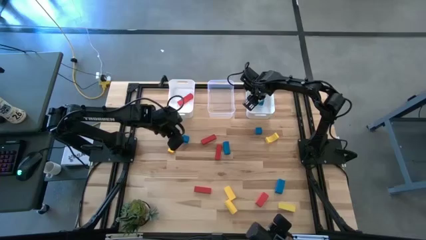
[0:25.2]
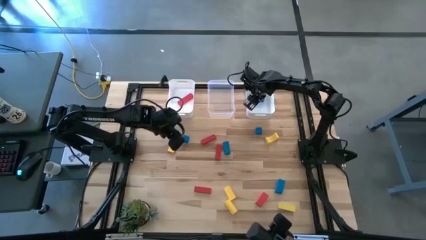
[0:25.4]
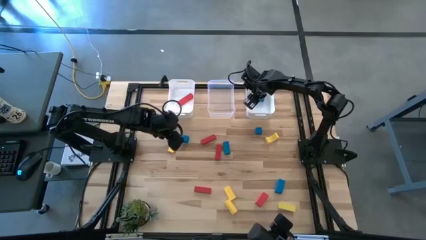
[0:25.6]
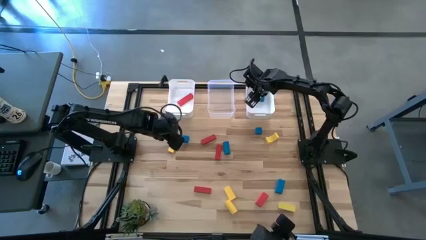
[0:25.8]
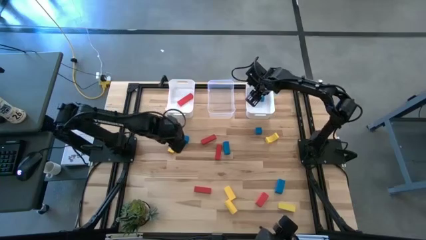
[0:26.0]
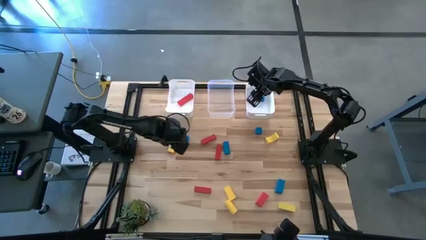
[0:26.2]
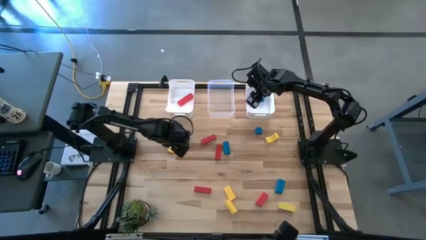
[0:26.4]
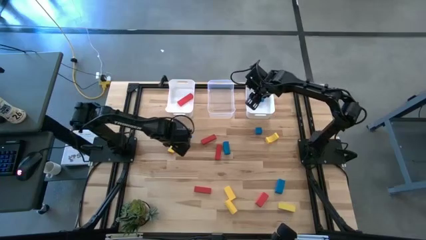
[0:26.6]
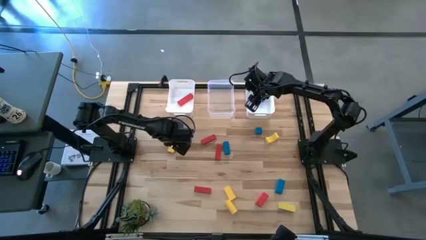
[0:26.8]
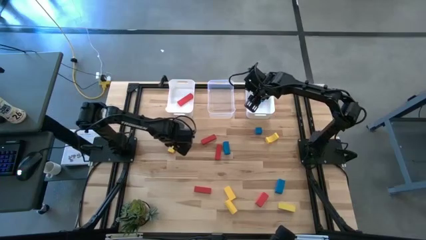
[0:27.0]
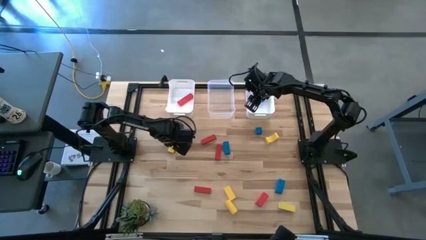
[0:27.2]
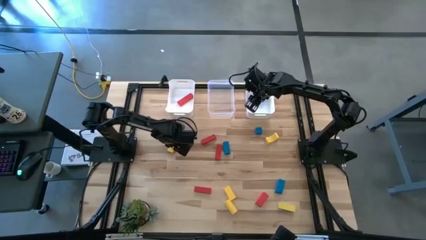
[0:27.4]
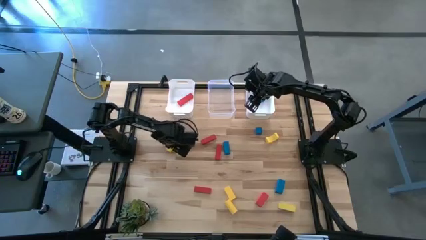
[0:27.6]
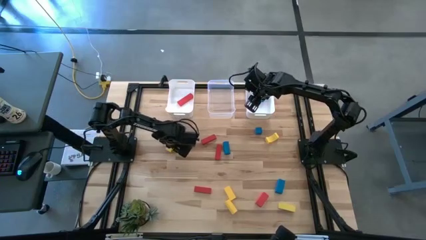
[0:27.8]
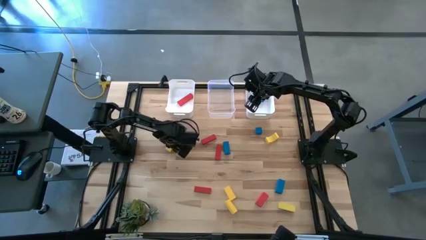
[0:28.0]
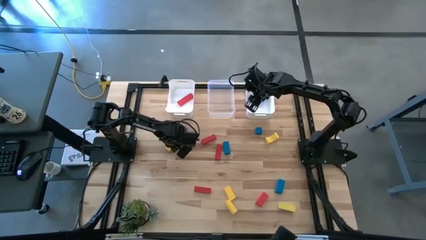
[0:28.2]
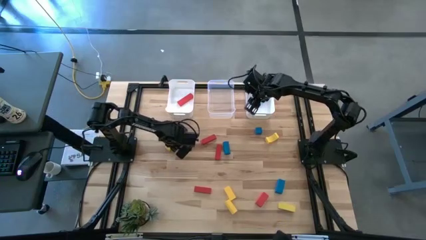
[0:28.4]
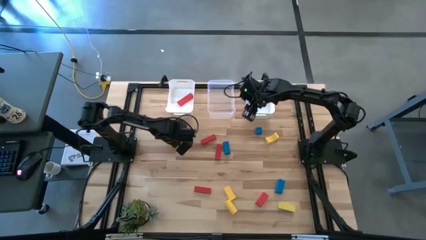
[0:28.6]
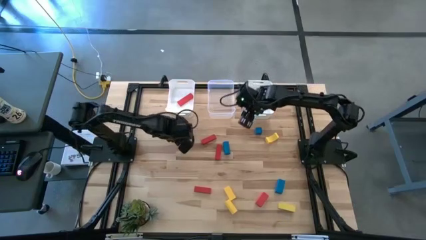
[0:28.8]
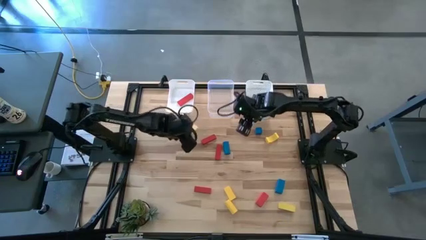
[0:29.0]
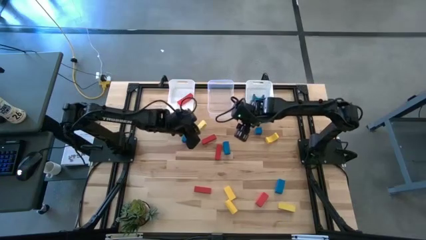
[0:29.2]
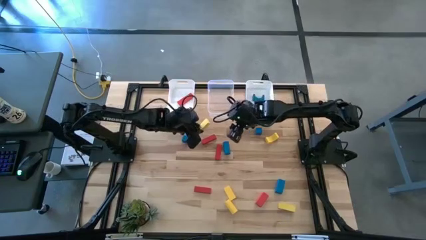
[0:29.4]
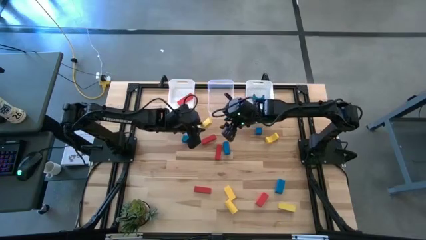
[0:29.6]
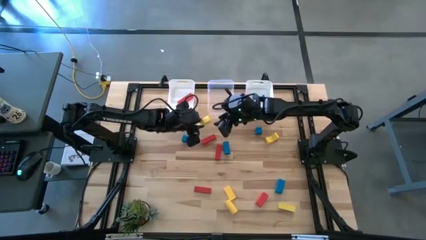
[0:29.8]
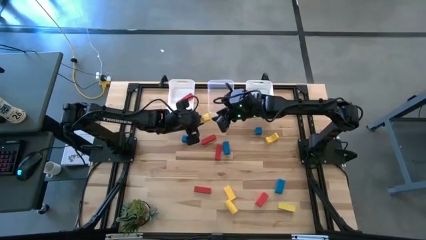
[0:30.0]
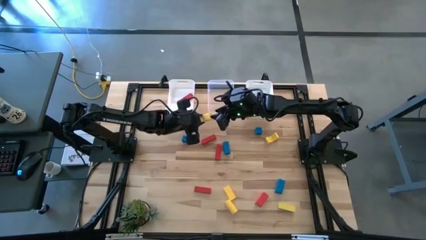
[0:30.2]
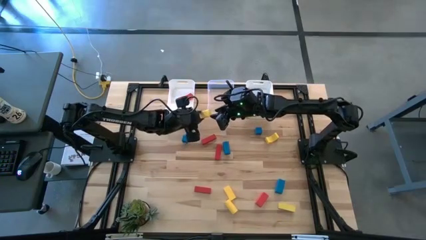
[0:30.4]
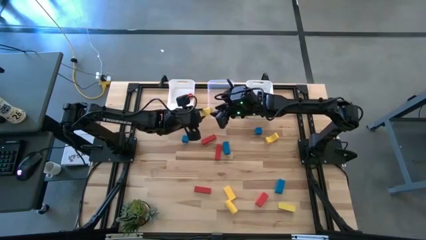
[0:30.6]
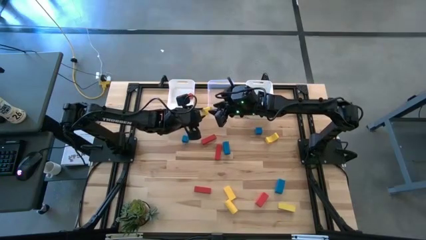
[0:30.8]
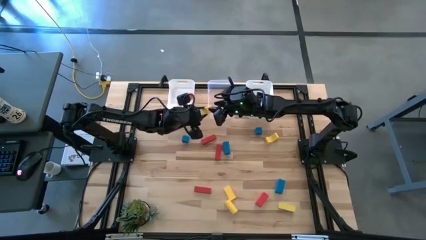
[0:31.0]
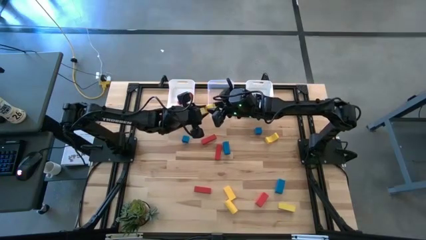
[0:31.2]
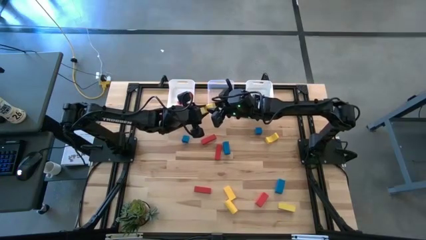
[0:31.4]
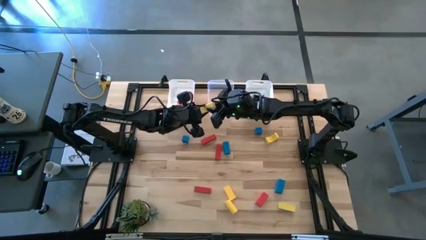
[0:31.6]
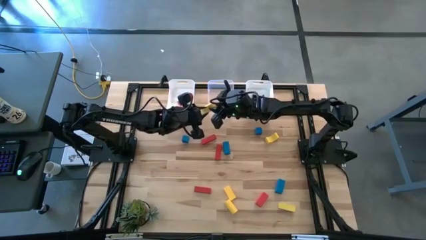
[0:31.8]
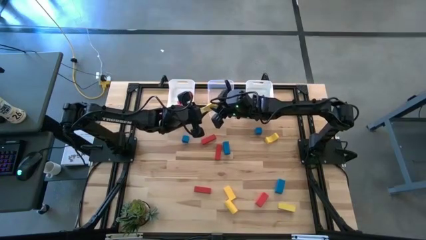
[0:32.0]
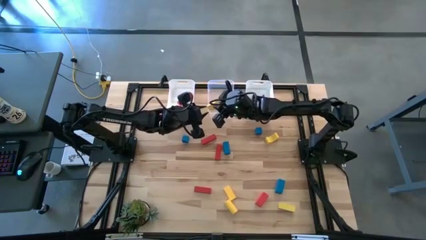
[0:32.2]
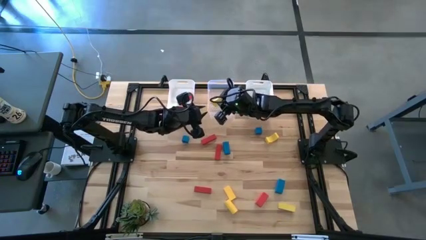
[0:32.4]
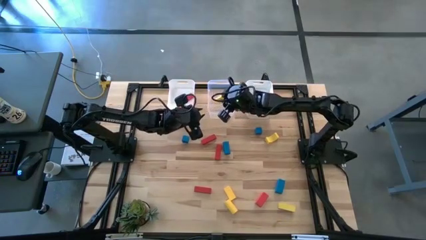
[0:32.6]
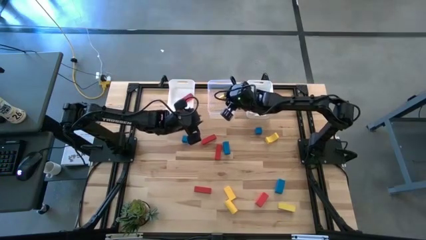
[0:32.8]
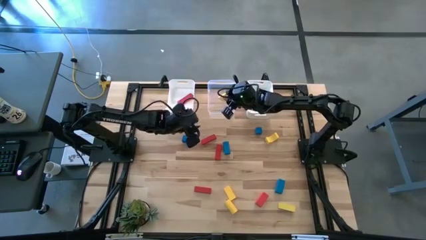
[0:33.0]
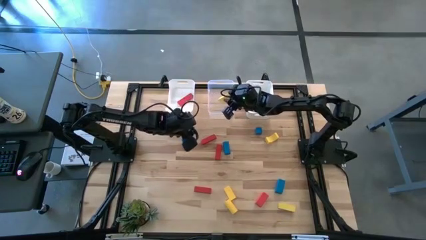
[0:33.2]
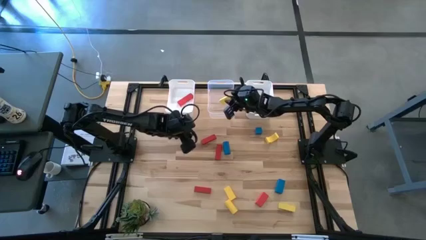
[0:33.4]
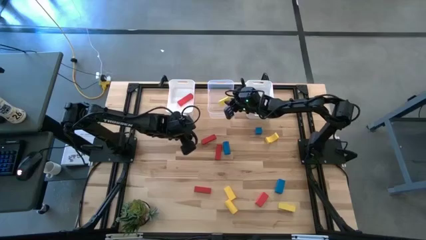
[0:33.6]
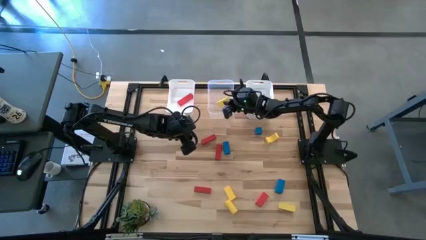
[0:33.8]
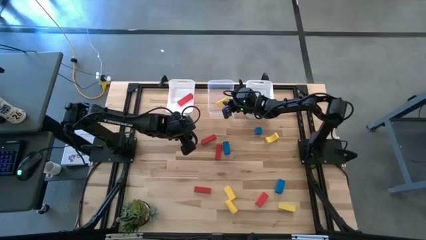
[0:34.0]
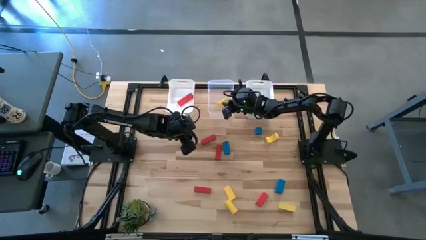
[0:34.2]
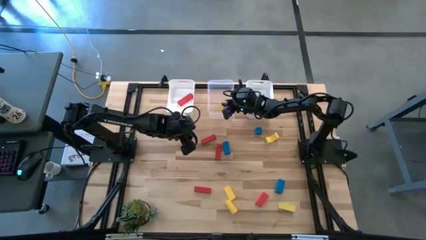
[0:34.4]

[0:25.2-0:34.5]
Task: Sort & place blocks by color
Put the yellow block into the transparent bin

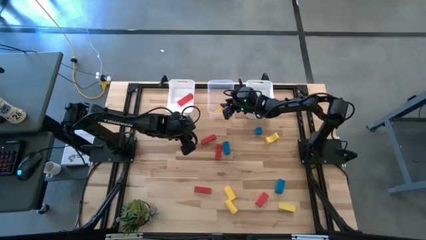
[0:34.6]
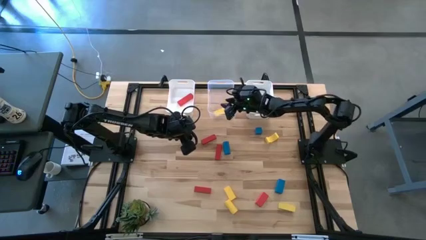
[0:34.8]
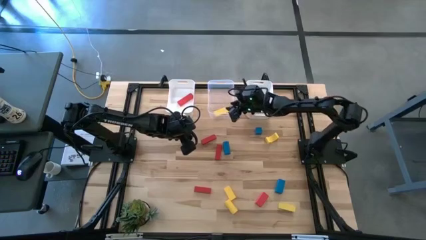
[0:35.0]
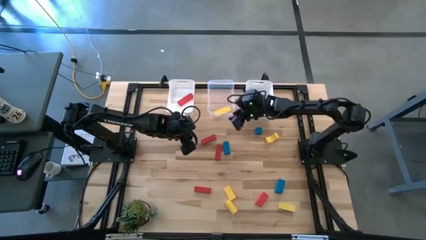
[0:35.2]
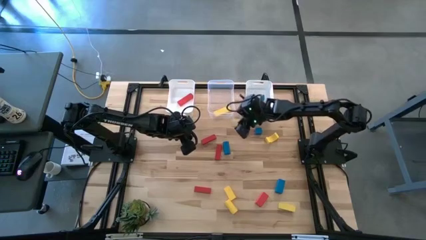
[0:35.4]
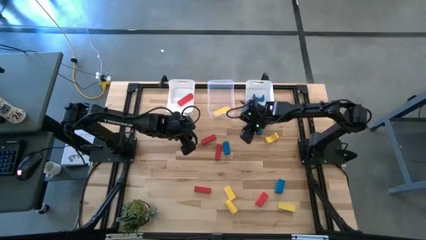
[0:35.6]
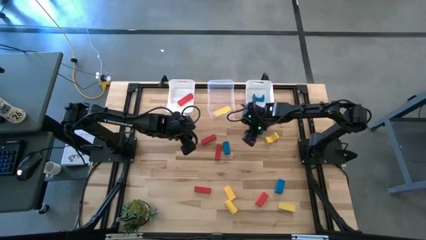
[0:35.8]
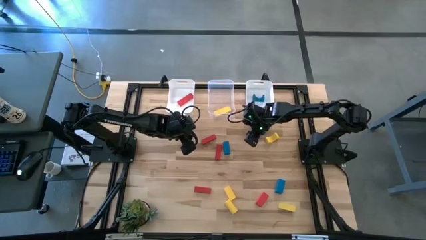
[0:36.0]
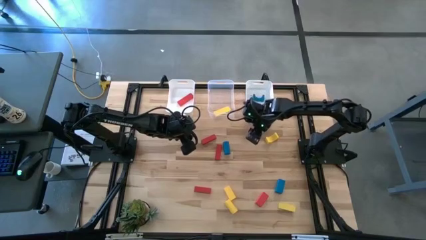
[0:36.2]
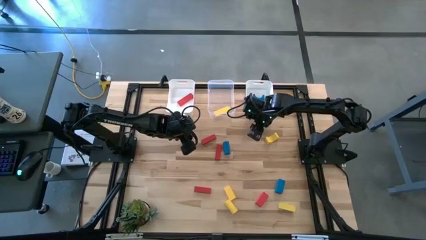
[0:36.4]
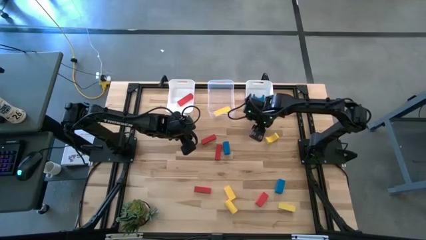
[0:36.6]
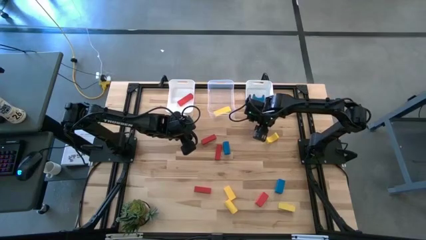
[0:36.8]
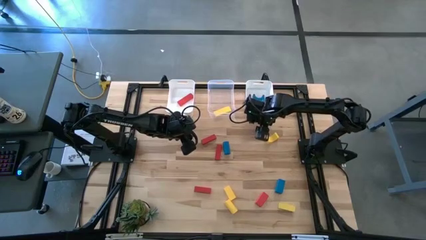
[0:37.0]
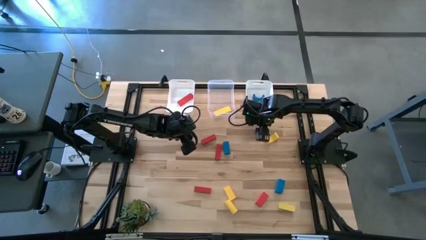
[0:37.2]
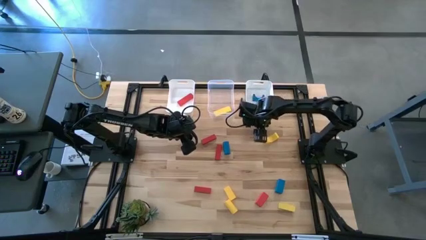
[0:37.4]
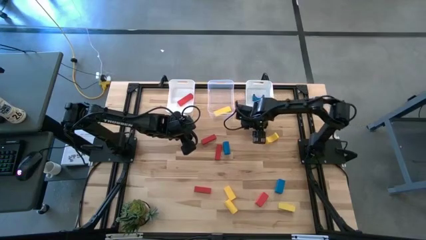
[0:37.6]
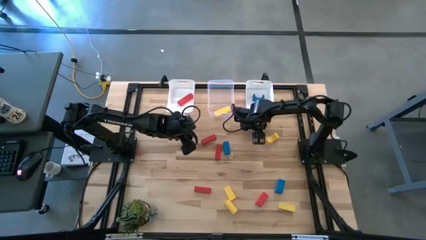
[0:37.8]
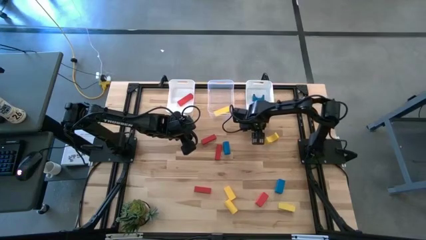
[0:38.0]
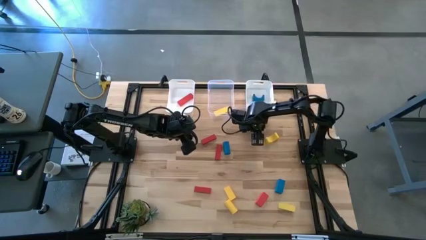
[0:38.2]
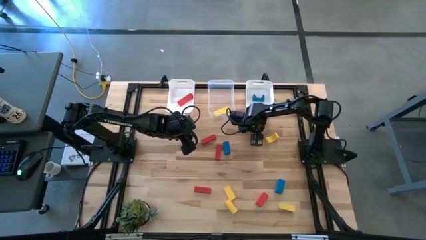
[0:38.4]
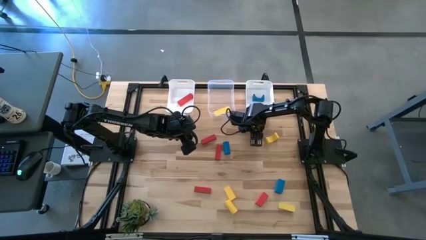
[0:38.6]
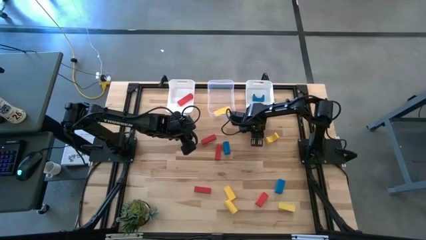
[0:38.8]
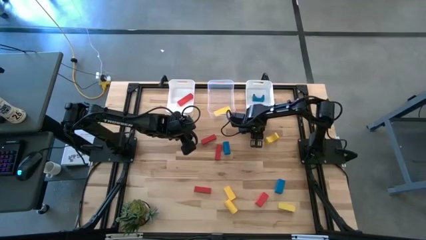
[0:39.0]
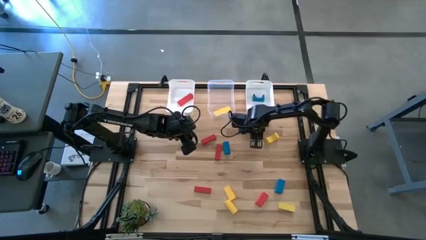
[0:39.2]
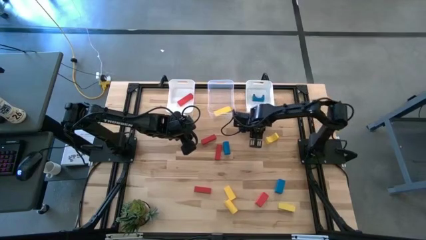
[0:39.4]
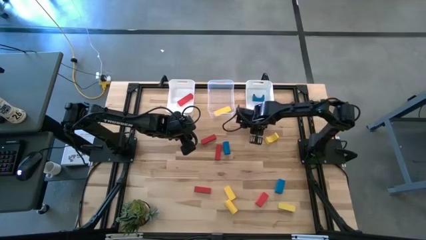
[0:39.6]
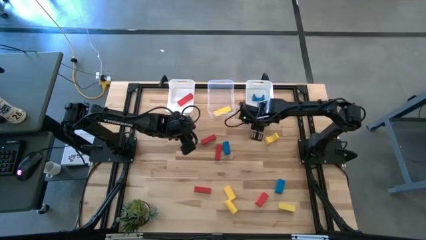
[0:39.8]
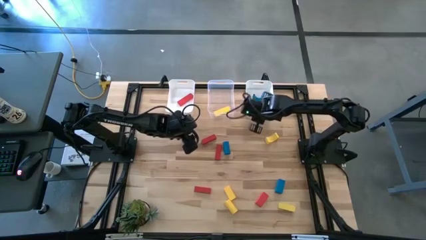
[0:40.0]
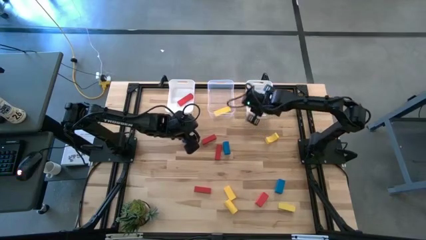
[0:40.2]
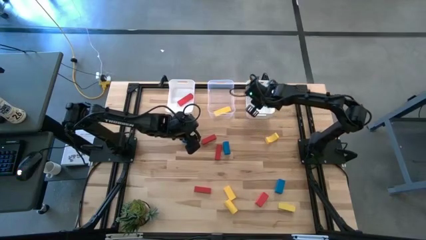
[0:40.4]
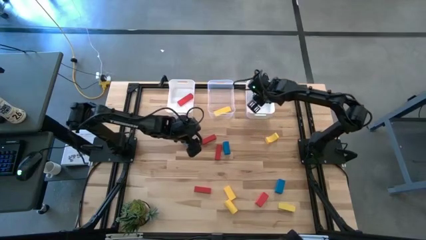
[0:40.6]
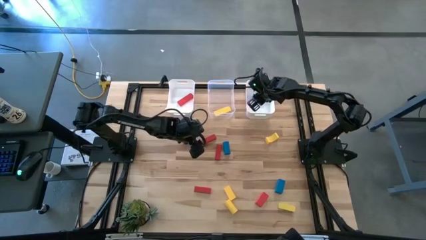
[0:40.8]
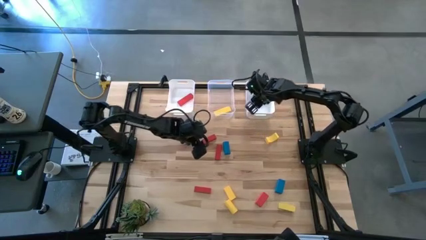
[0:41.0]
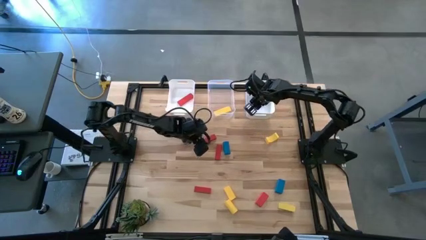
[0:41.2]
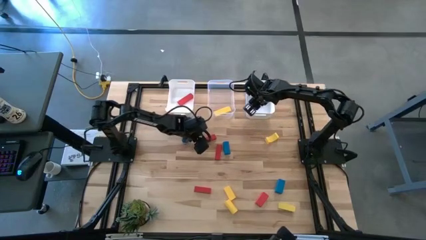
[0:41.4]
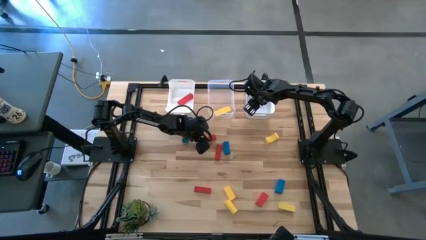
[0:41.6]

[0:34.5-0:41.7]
Put the blue block into the right white bin
